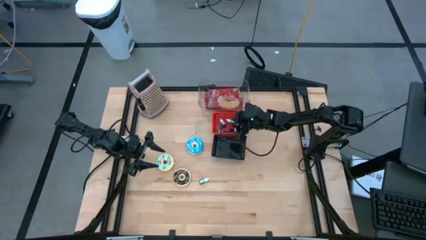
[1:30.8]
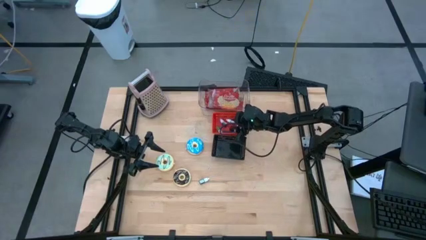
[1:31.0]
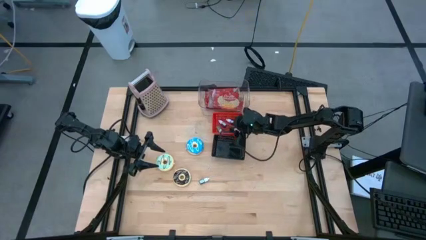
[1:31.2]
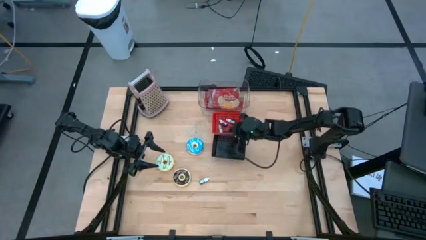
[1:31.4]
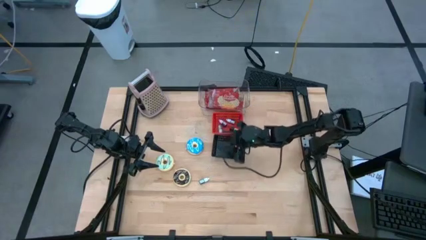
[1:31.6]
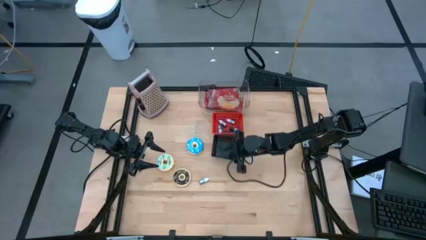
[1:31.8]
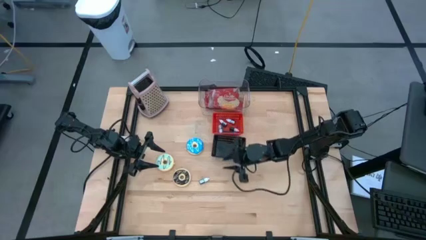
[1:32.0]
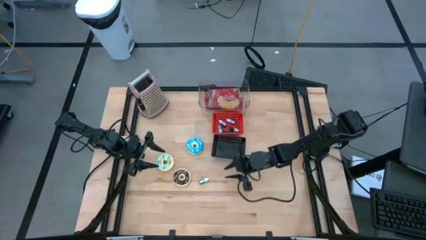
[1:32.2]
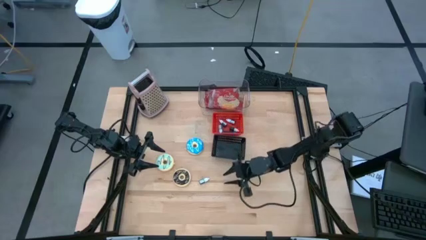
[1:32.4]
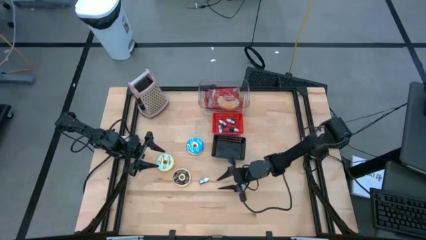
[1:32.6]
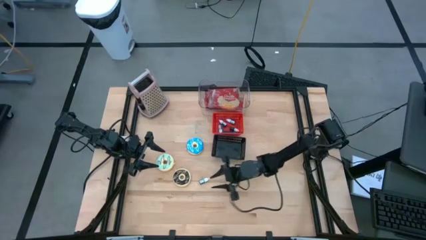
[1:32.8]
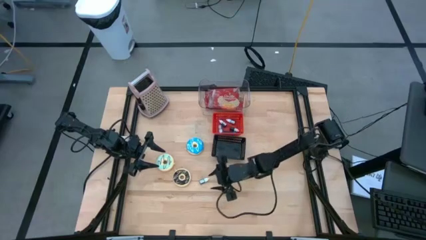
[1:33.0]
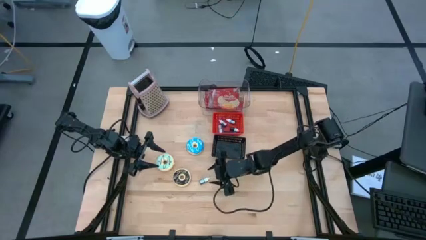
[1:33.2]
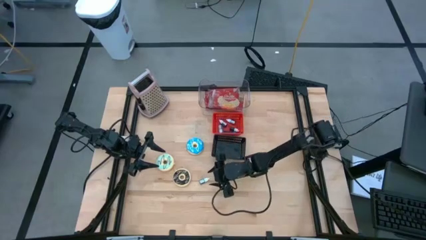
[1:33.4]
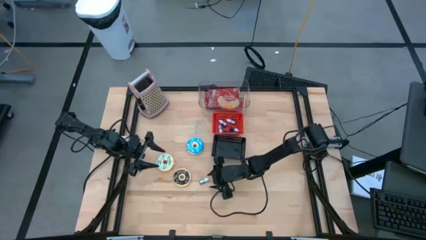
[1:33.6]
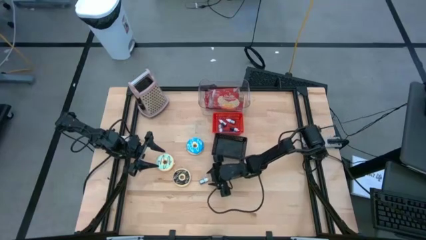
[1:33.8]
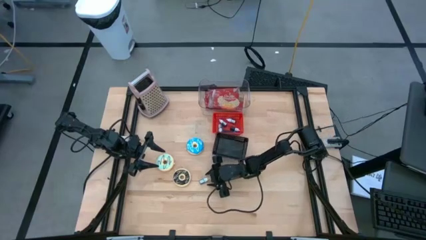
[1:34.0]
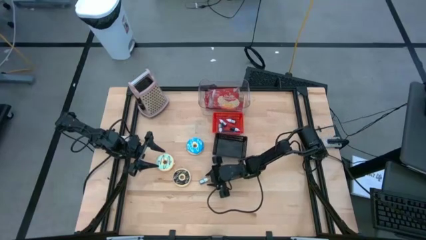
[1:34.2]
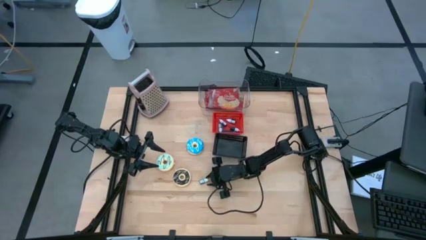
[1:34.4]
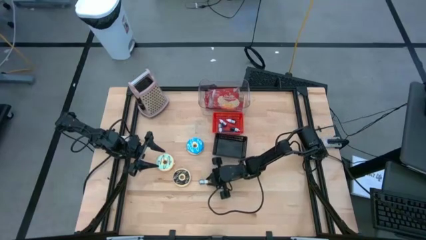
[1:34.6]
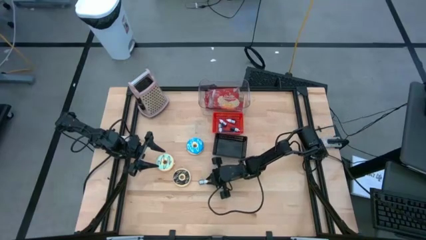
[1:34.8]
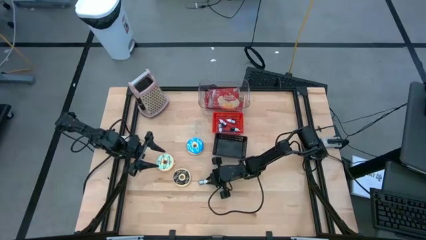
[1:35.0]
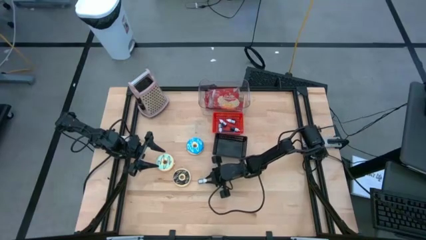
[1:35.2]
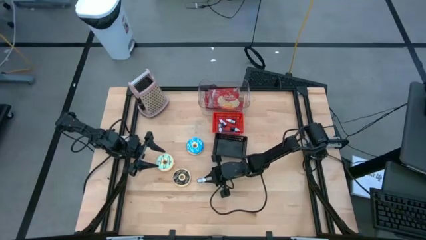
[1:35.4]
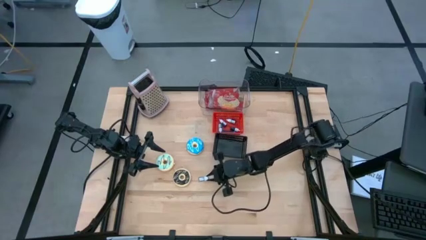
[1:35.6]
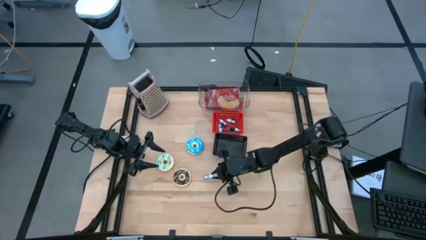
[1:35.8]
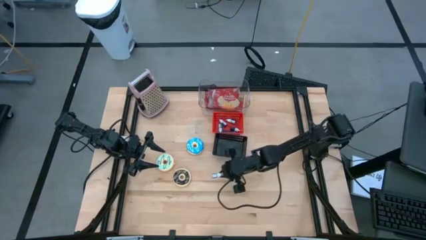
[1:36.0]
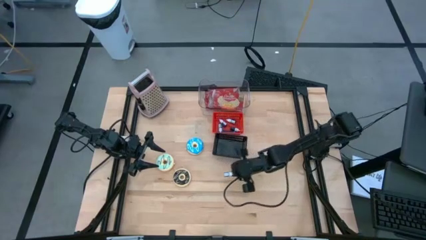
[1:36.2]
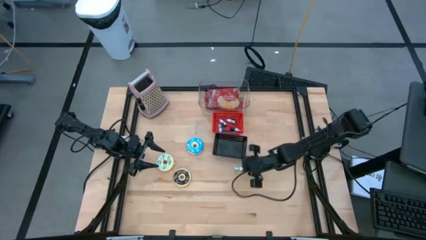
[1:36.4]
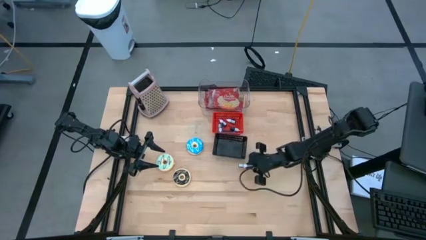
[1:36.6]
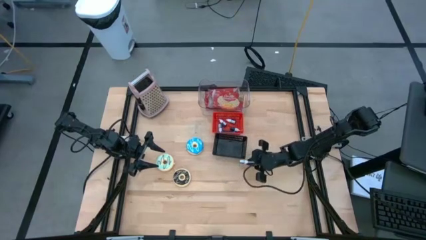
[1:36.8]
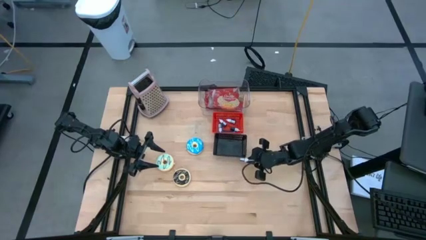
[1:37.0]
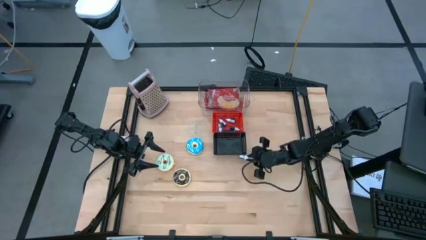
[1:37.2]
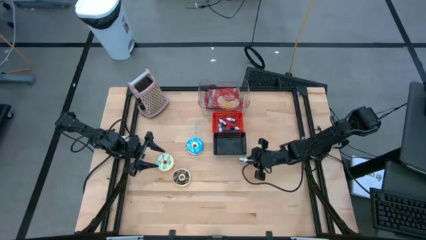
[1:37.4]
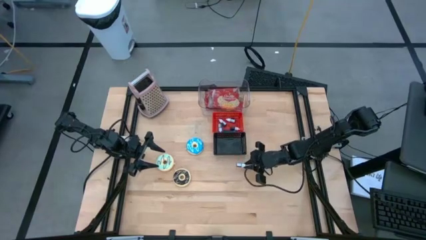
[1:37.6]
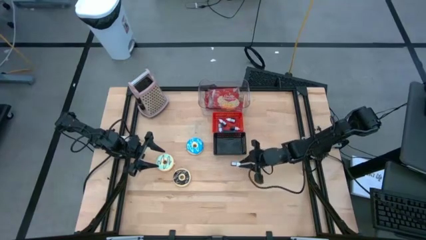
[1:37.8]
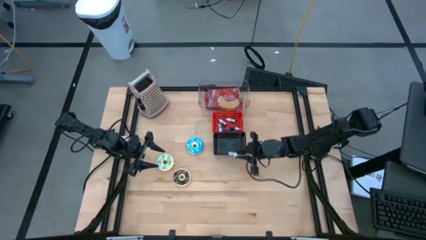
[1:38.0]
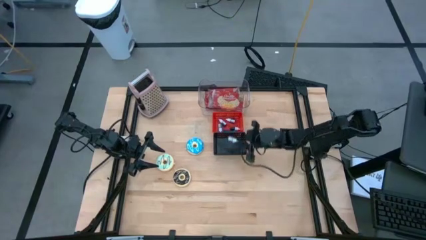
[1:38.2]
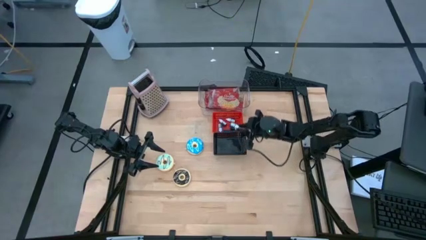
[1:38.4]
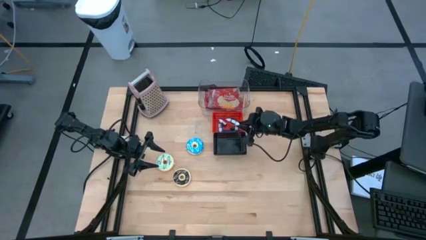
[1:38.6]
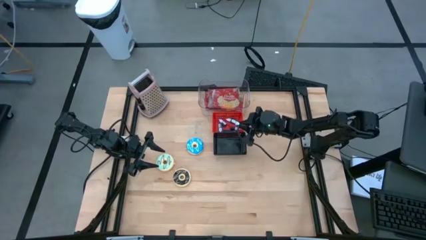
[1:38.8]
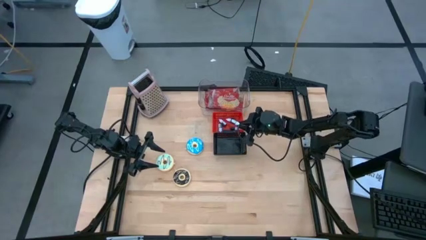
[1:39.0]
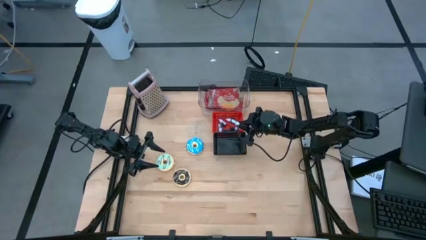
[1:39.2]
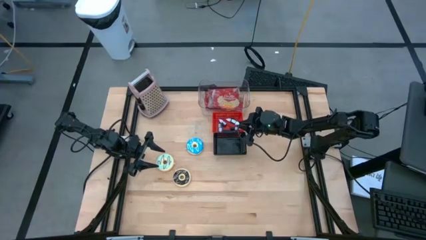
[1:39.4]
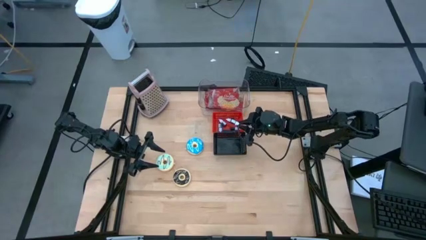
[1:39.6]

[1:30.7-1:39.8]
Put the black food coloring into the red bin

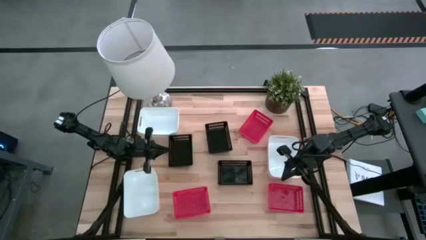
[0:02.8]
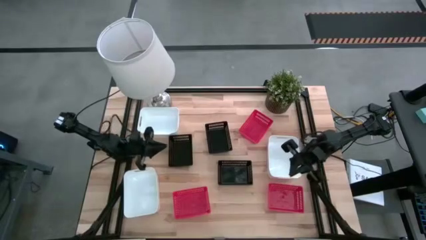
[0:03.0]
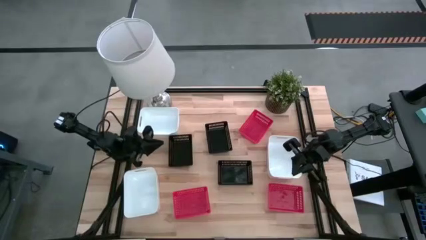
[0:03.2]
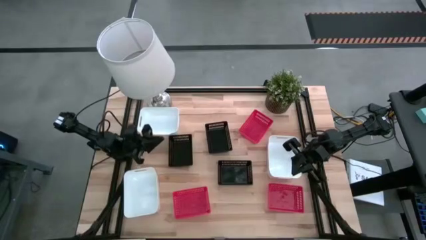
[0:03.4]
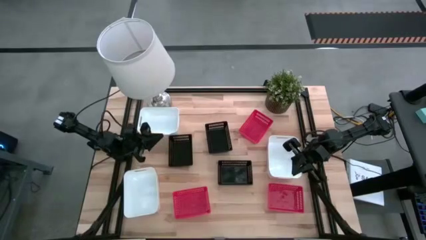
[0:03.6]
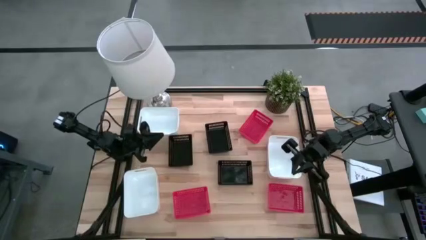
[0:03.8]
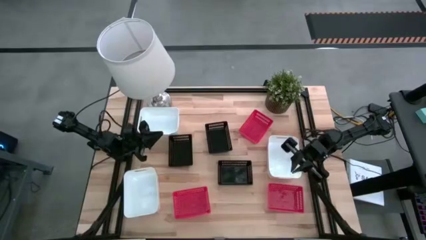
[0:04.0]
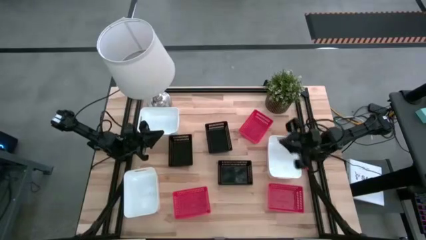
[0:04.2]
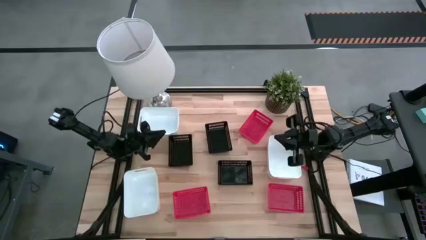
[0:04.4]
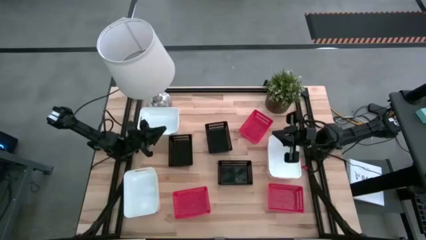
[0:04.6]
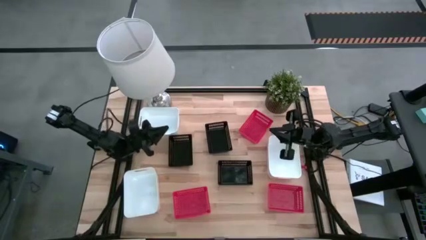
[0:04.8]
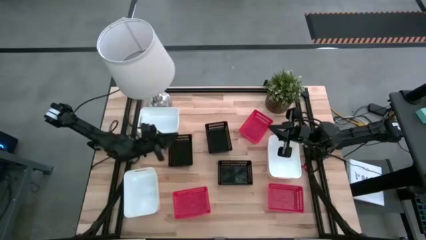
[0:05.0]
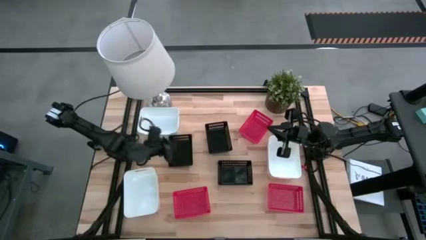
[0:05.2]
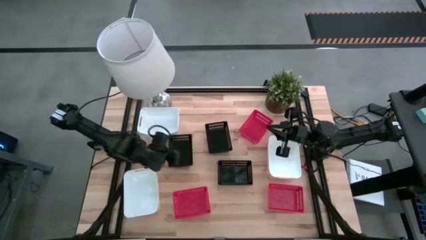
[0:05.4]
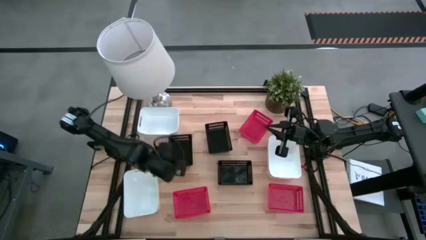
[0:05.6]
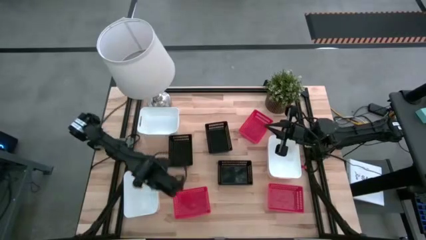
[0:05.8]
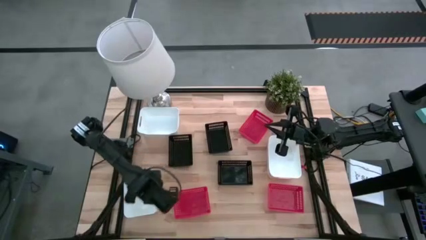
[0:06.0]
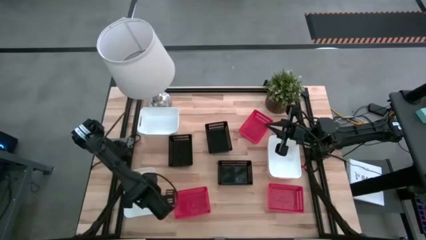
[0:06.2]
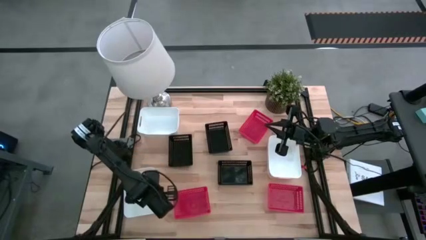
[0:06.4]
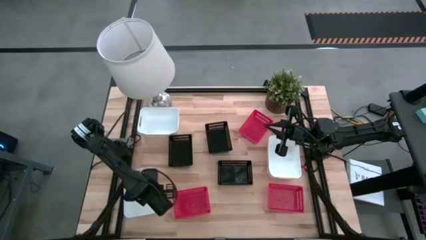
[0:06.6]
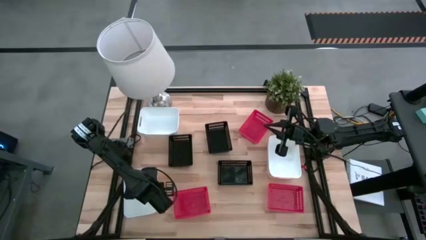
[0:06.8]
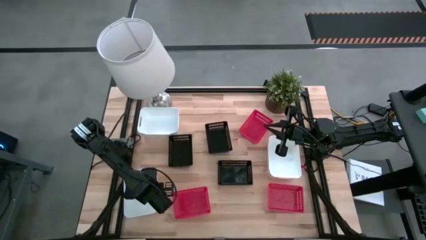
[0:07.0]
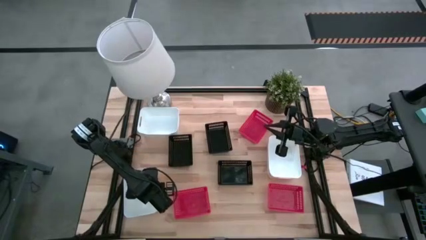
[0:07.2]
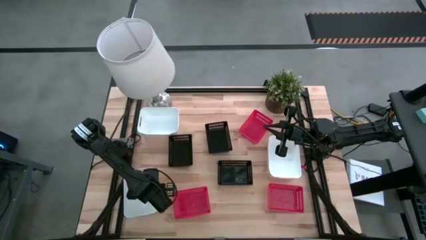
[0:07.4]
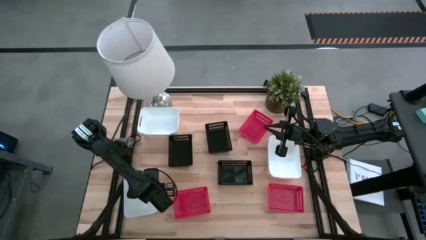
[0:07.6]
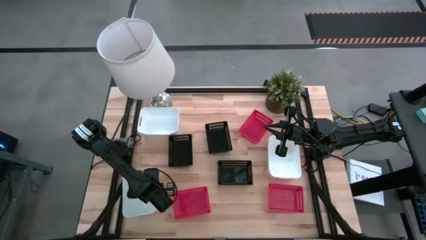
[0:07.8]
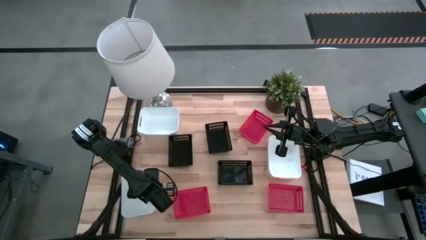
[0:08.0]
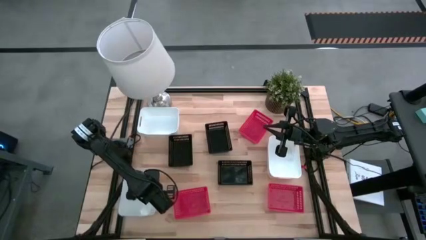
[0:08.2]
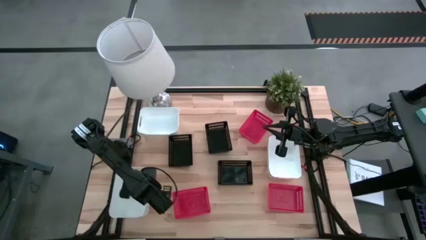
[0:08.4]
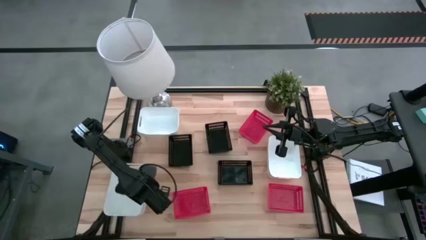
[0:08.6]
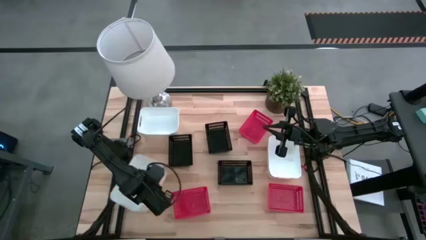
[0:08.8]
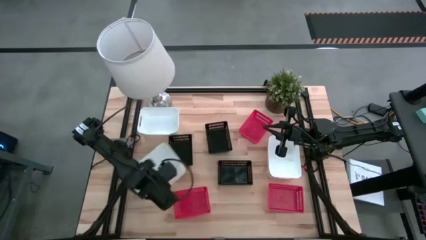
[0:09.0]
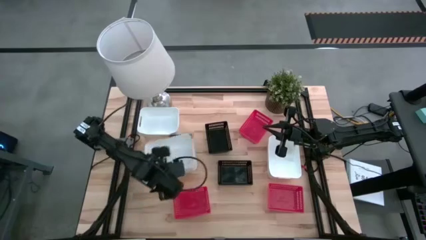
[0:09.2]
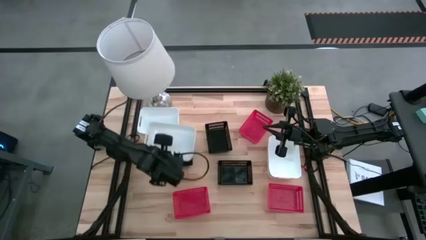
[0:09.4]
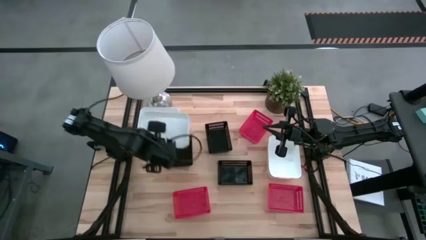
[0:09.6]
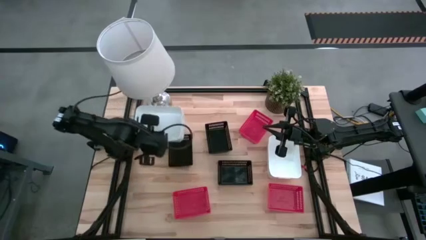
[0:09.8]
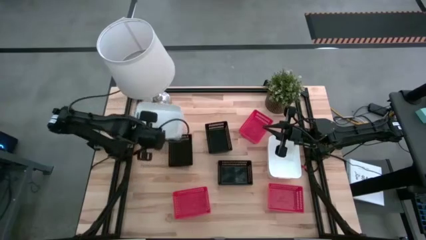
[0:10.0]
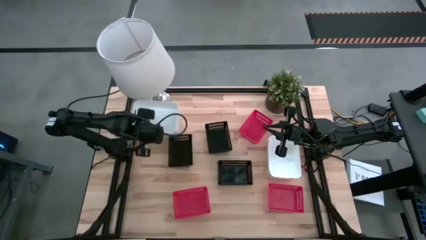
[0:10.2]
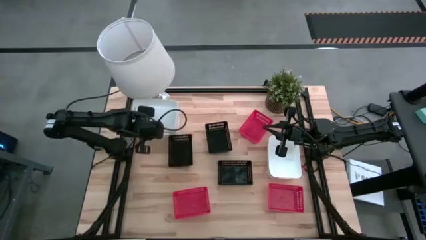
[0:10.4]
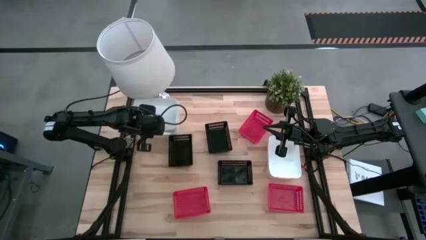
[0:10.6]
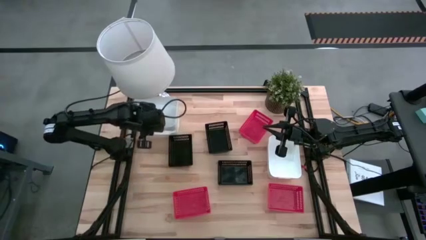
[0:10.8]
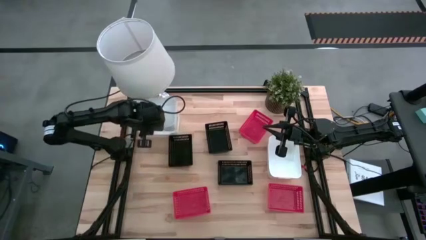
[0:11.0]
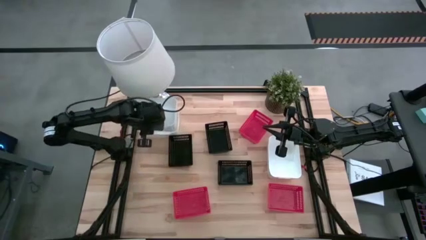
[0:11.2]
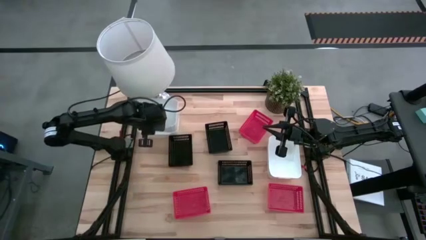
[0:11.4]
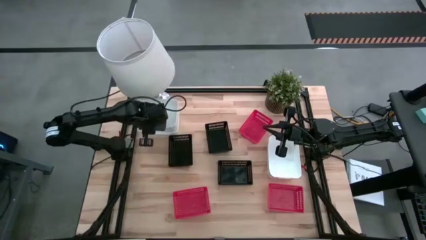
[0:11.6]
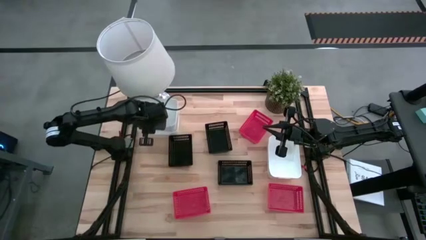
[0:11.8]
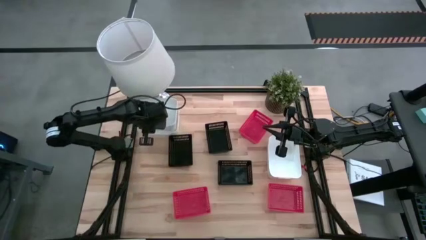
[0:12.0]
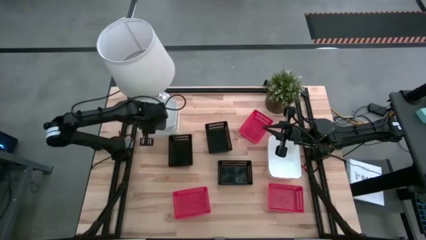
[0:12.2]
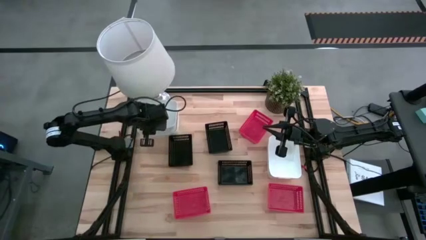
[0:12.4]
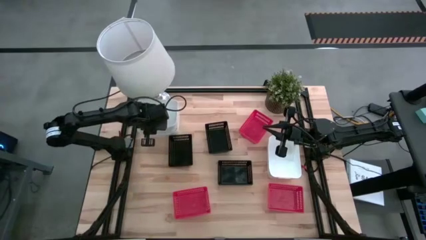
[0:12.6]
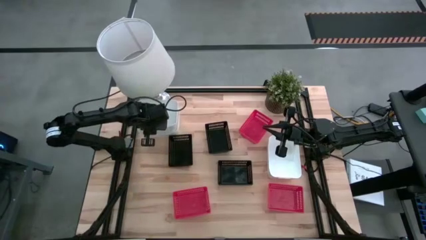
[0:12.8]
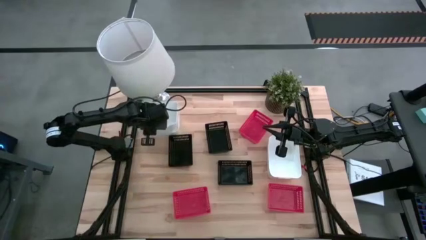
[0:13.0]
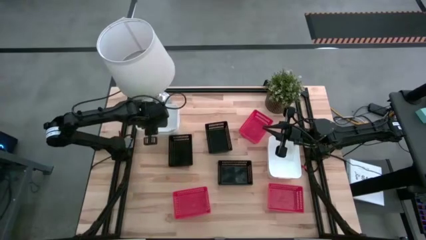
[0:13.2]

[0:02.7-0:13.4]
Stack the bottom white bin on top of the top white bin
